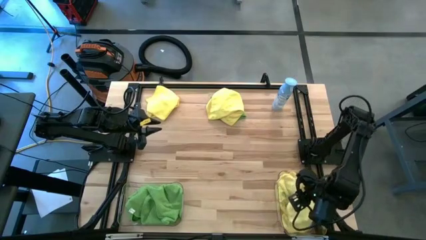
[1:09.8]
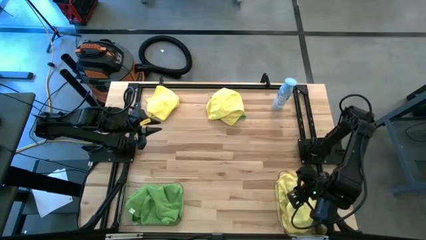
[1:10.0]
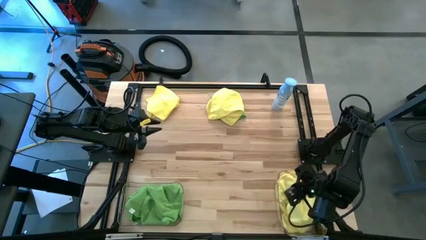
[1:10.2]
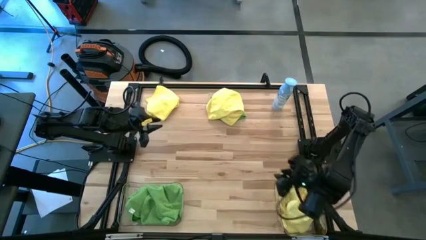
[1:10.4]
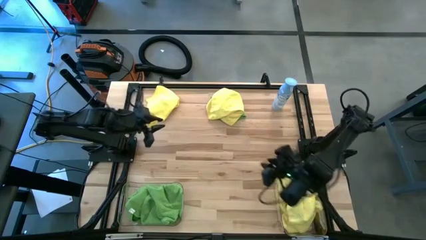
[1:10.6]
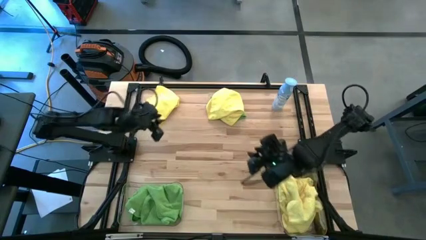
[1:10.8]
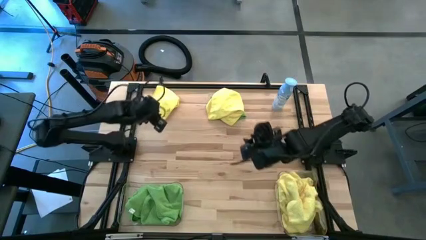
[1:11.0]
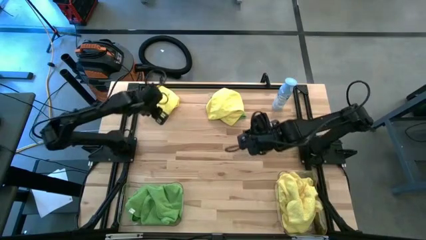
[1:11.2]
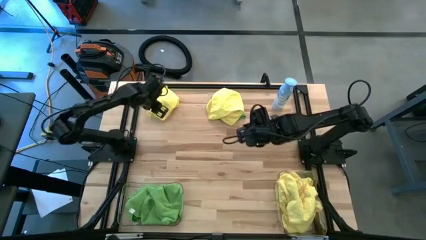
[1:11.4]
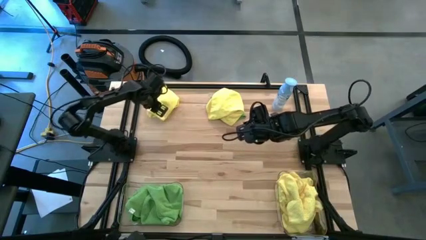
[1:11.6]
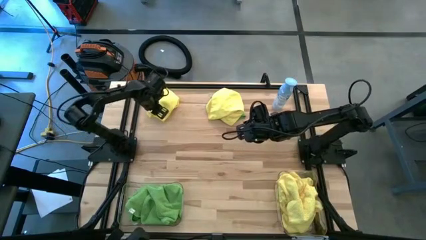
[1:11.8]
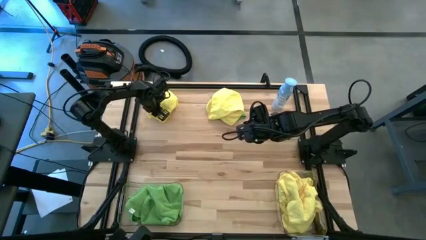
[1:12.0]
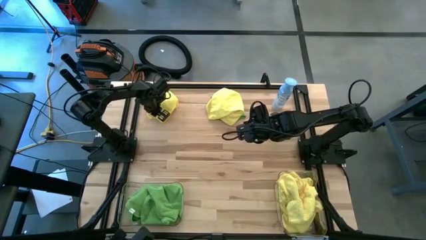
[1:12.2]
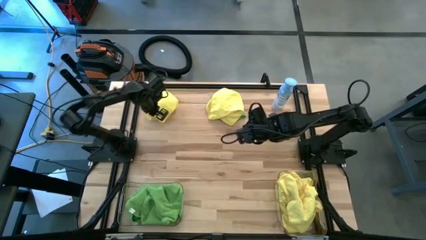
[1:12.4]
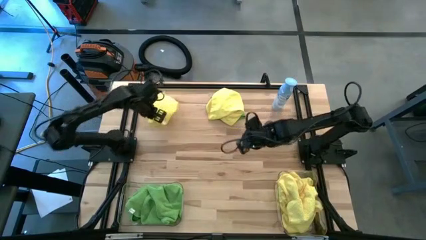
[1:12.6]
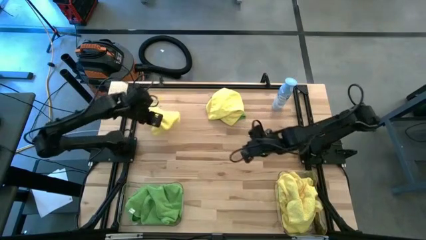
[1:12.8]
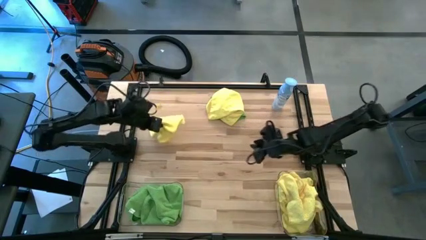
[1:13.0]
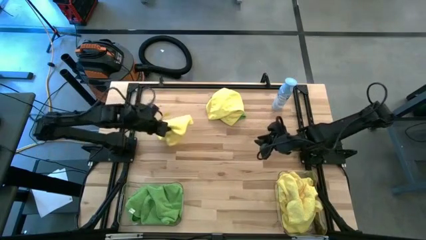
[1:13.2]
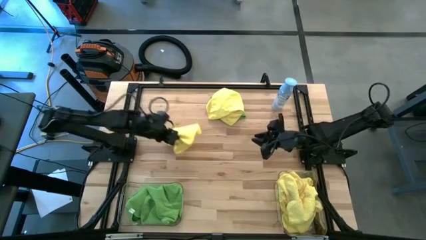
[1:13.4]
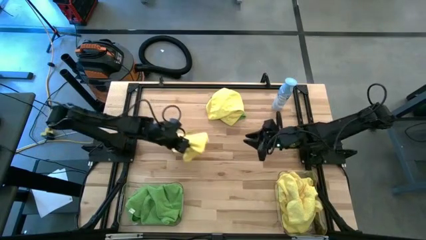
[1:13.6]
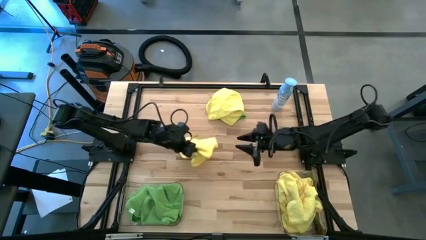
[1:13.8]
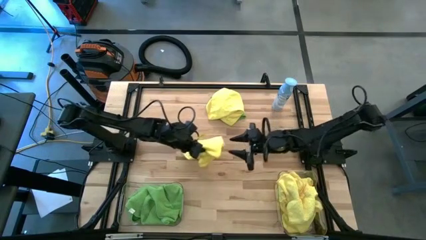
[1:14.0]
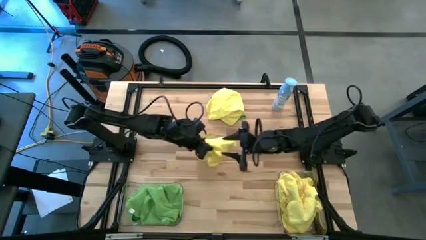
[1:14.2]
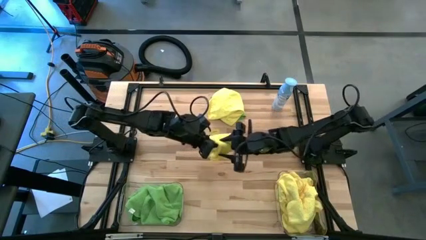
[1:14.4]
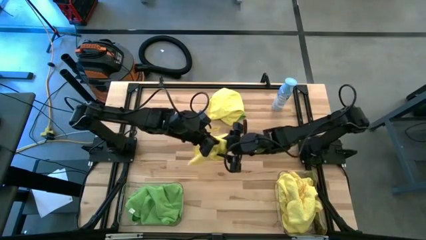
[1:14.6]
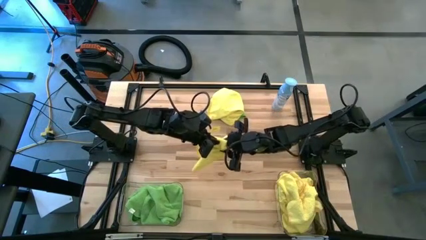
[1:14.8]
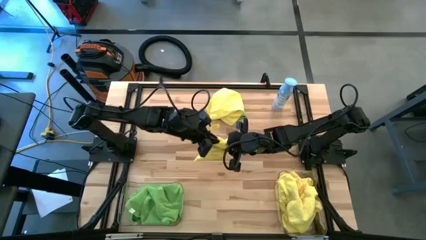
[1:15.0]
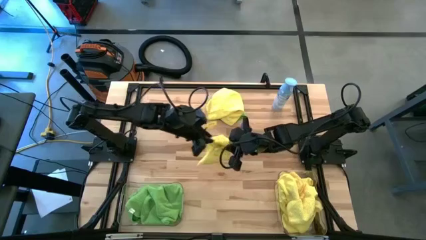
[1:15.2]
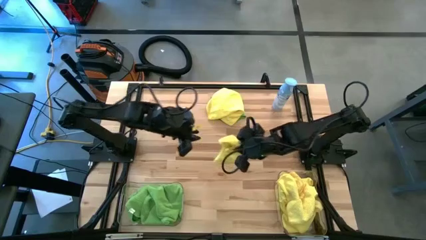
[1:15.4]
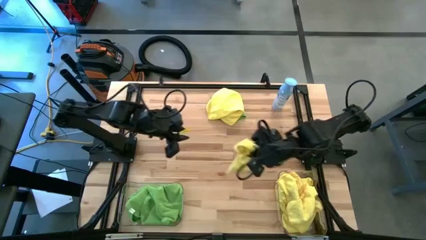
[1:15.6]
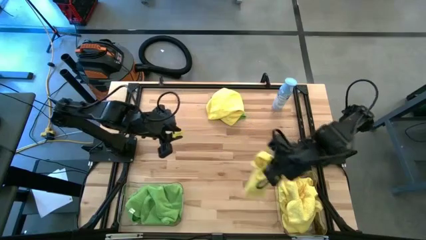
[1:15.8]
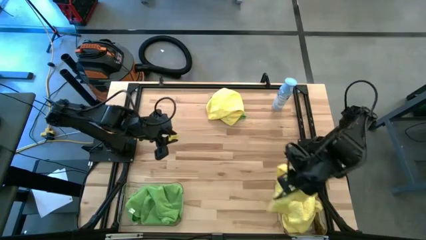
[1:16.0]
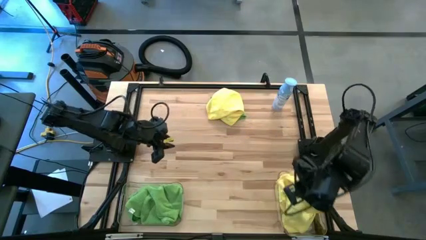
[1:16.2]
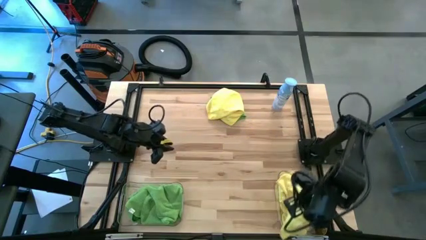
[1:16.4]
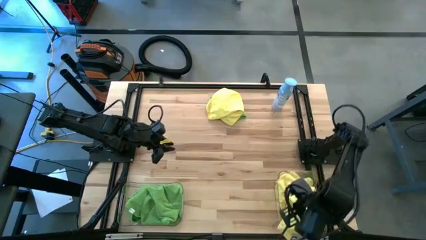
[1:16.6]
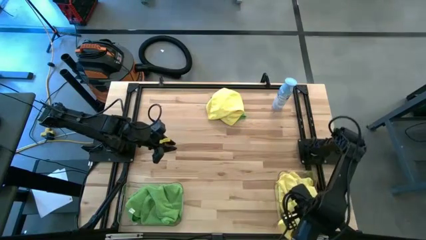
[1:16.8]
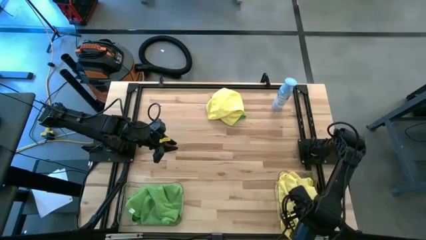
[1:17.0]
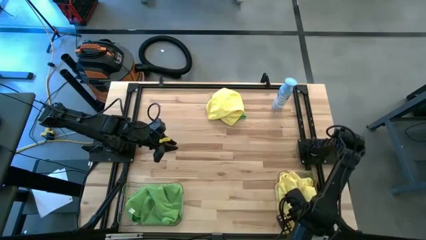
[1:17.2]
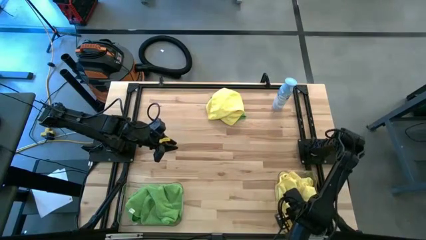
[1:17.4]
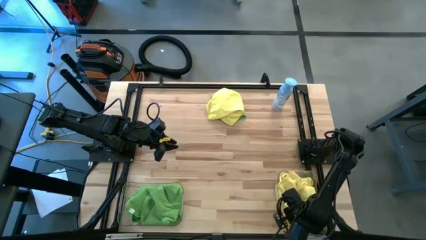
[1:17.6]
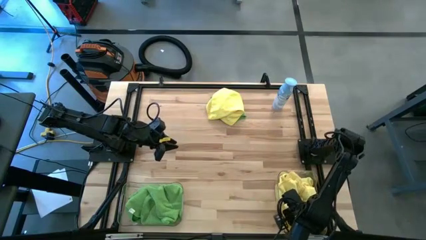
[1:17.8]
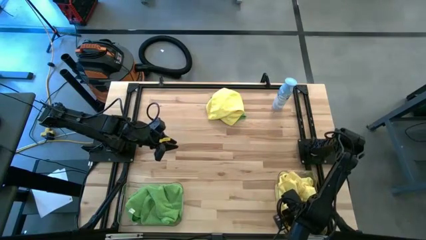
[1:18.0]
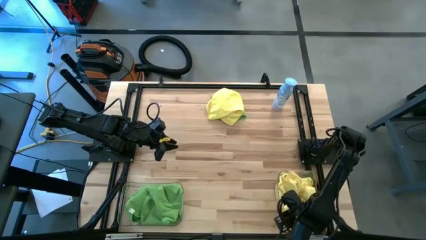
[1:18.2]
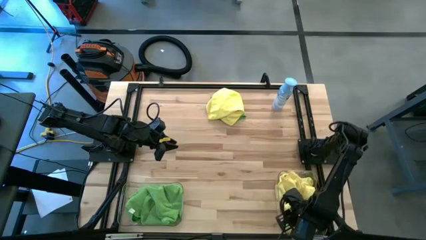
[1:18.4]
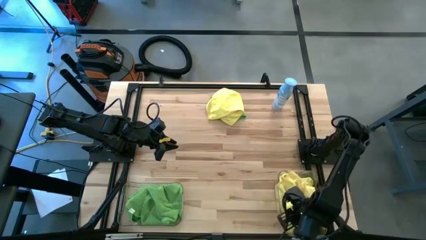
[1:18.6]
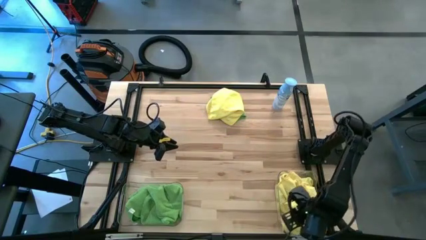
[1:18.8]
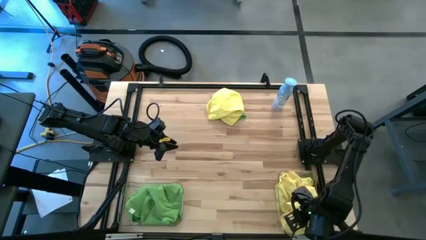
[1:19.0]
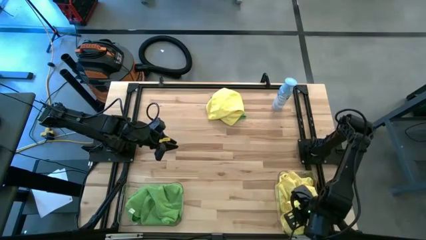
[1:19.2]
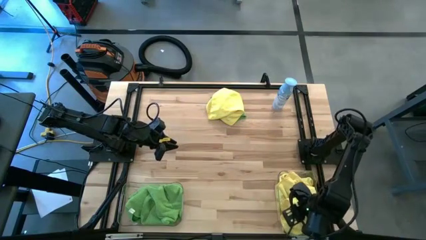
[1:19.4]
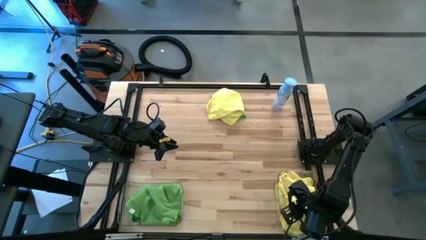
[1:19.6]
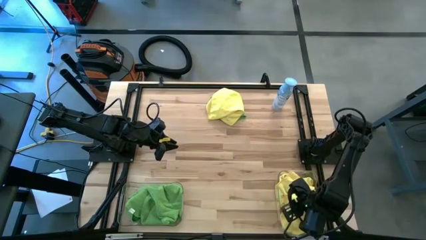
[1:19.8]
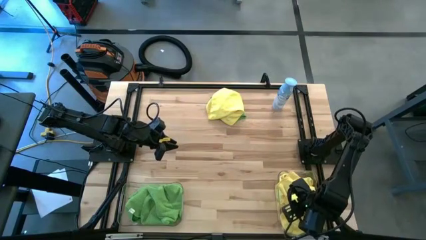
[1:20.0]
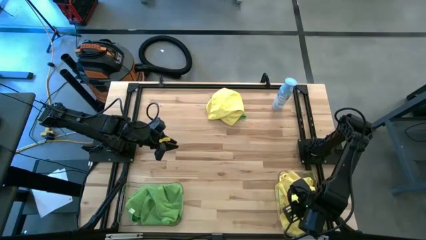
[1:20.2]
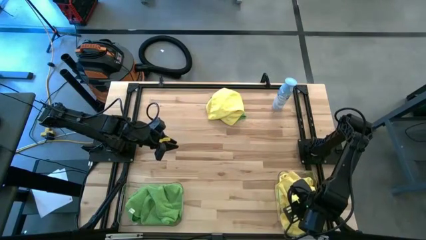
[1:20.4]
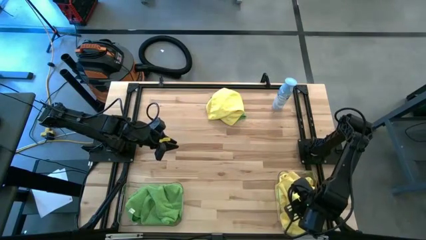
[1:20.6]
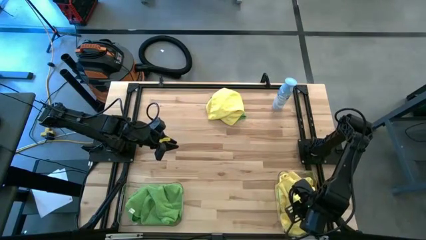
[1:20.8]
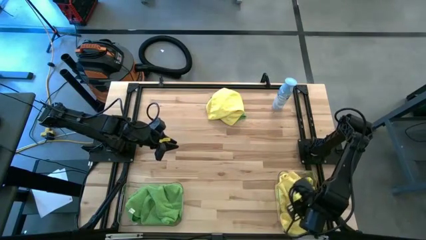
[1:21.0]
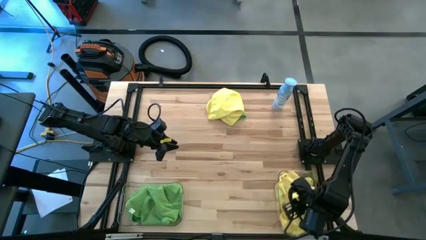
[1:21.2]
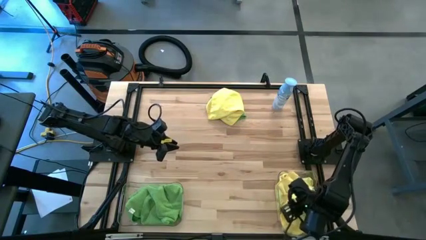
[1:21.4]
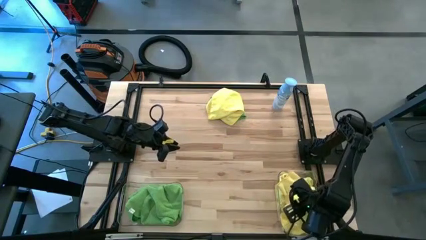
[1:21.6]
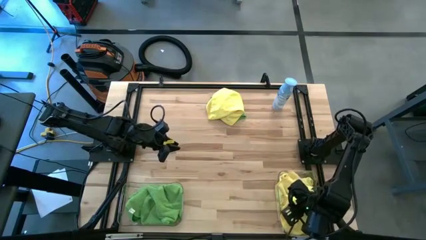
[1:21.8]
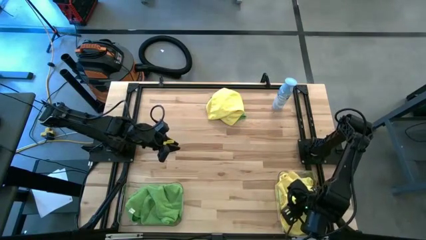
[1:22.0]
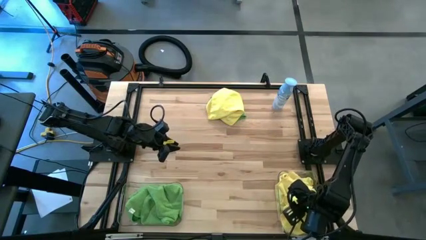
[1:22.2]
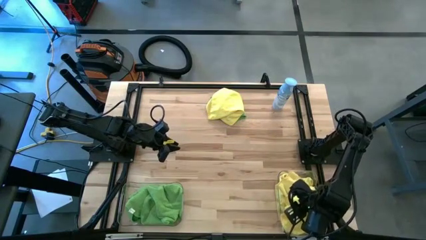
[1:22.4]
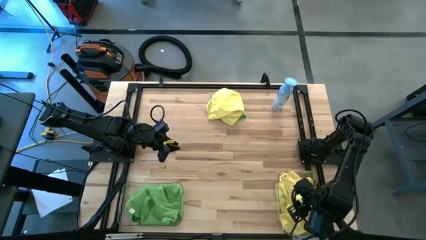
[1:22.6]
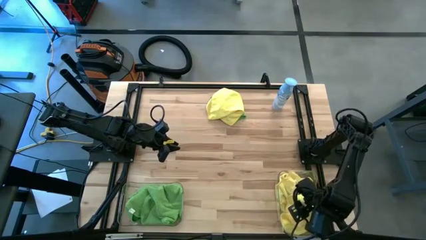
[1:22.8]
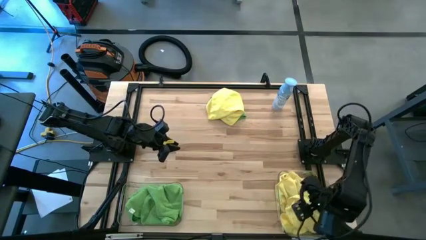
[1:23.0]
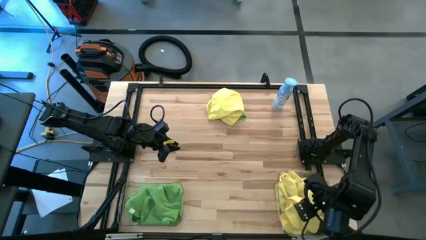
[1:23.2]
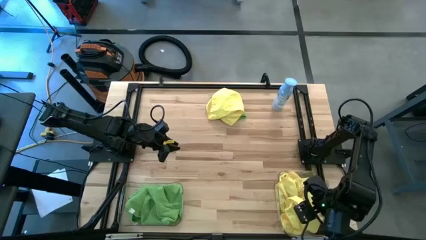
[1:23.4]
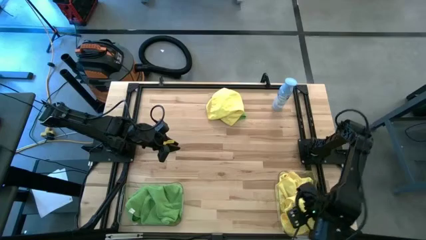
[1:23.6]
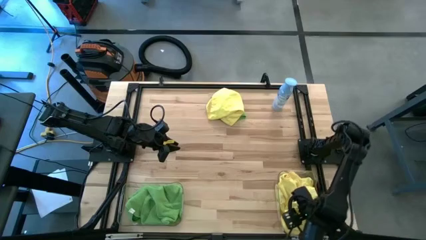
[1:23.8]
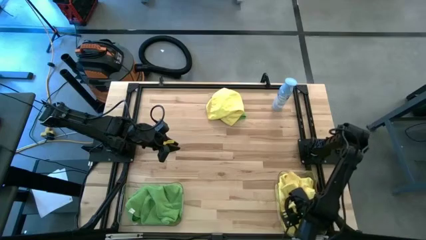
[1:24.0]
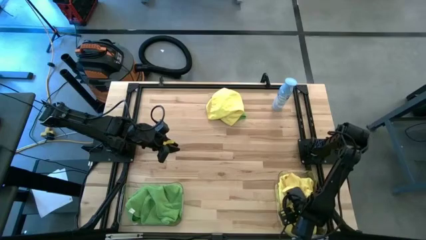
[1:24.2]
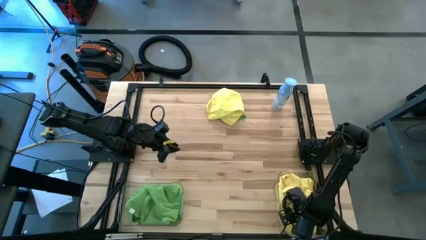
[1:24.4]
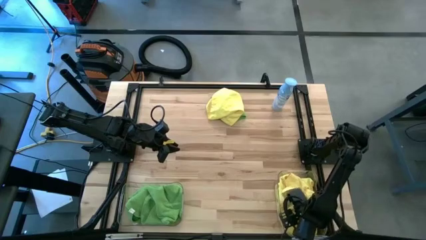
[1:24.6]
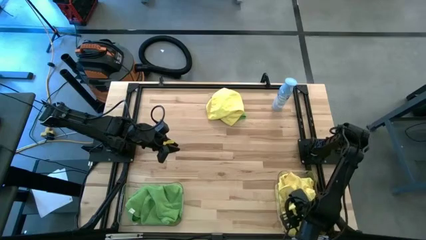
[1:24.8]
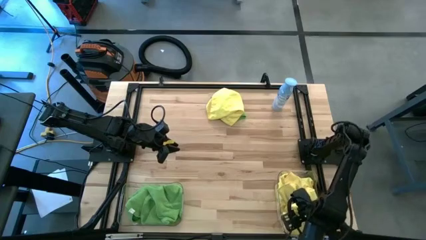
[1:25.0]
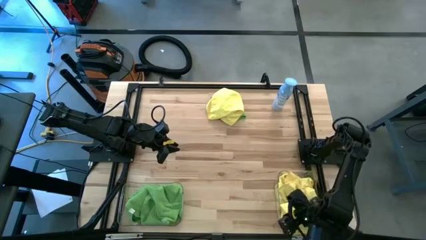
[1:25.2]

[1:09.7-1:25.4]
Task: Sort microfiber towel by color & place in baskets
Put the left yellow microfiber towel into the right transparent bin
